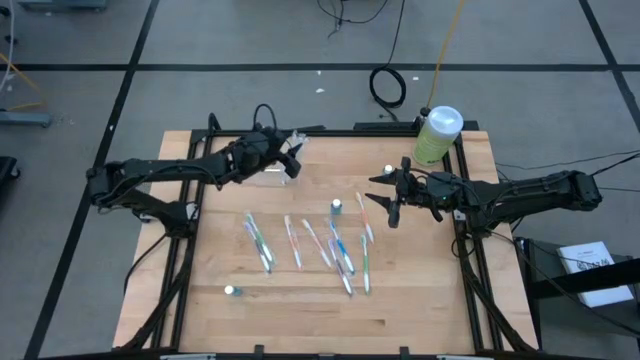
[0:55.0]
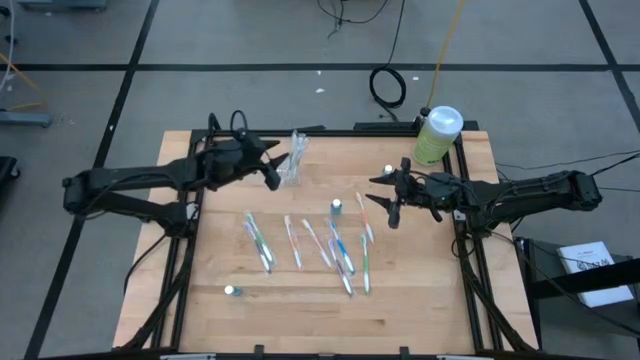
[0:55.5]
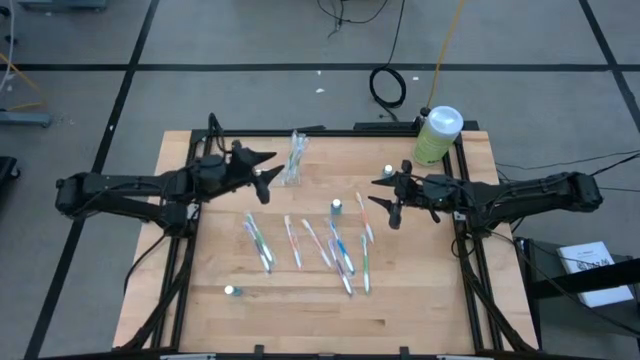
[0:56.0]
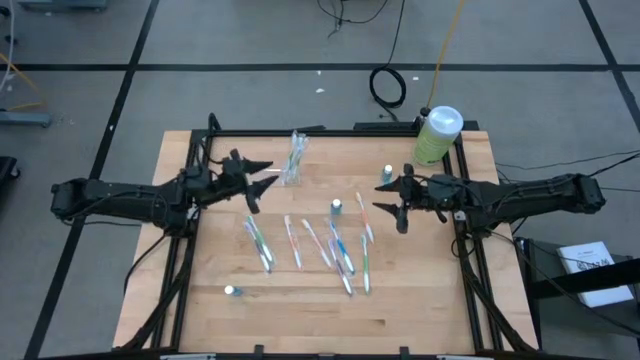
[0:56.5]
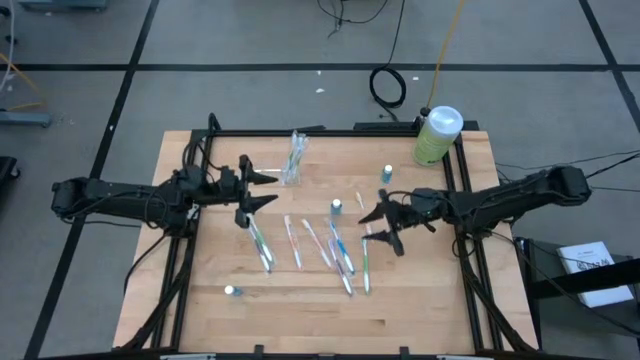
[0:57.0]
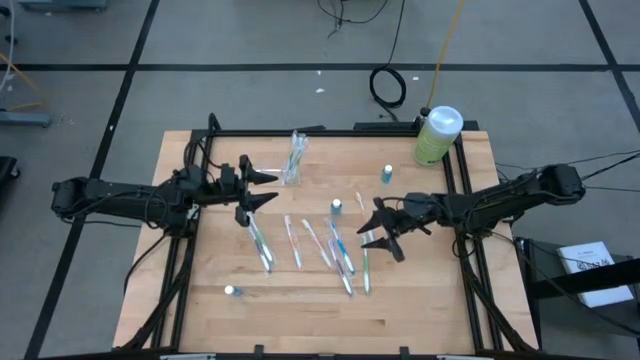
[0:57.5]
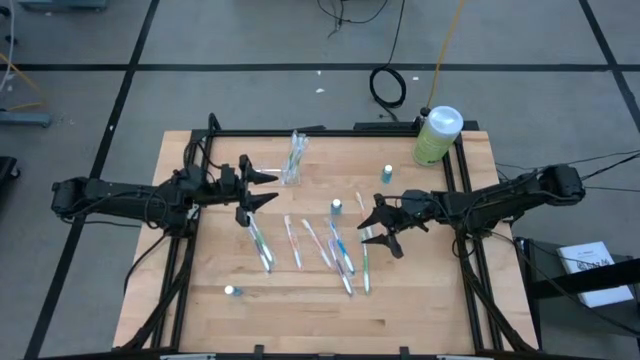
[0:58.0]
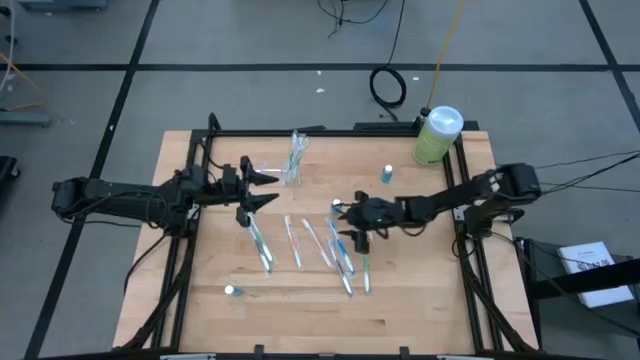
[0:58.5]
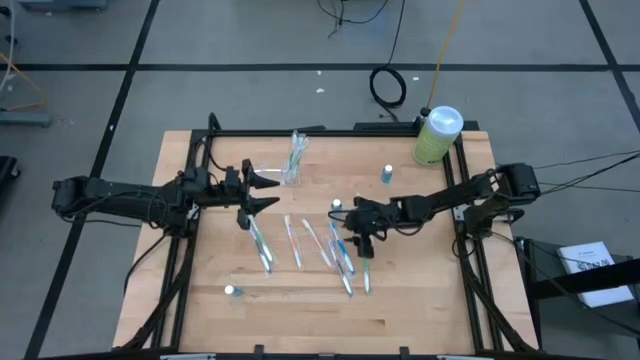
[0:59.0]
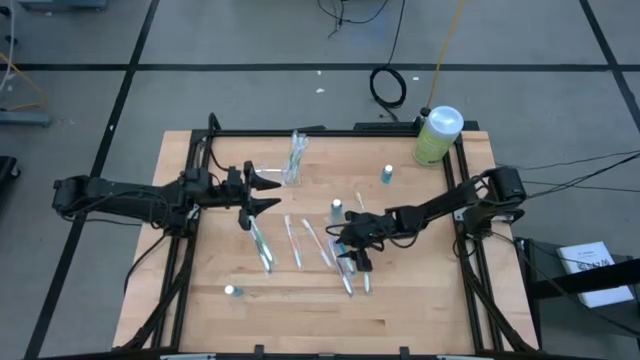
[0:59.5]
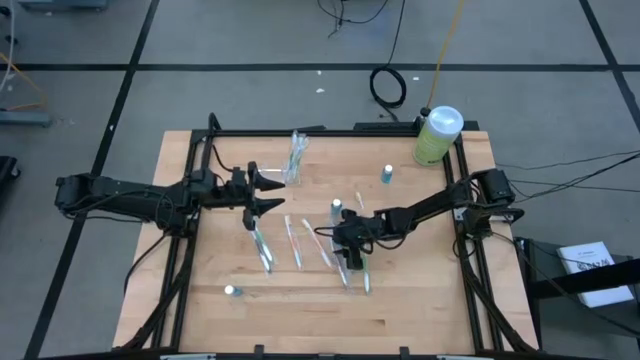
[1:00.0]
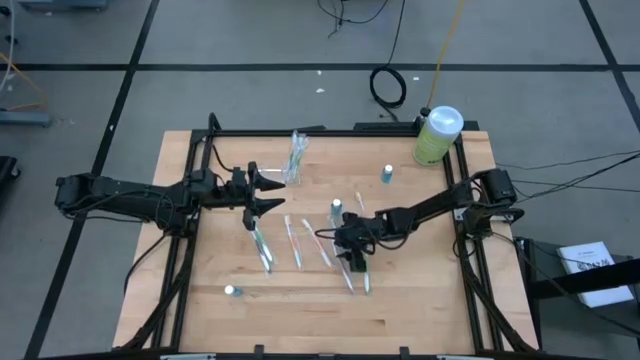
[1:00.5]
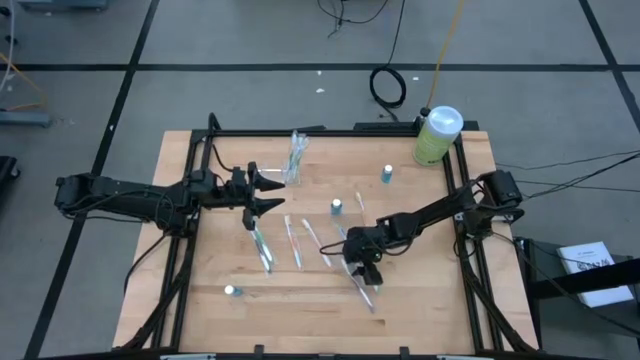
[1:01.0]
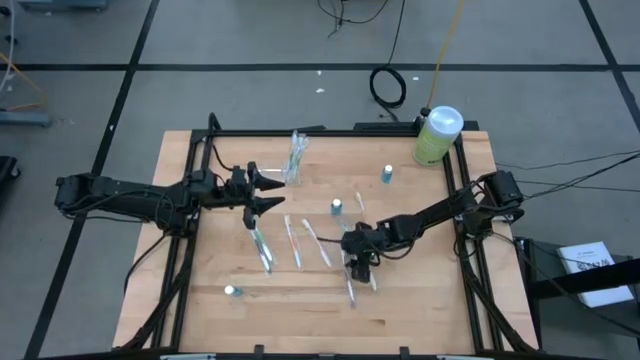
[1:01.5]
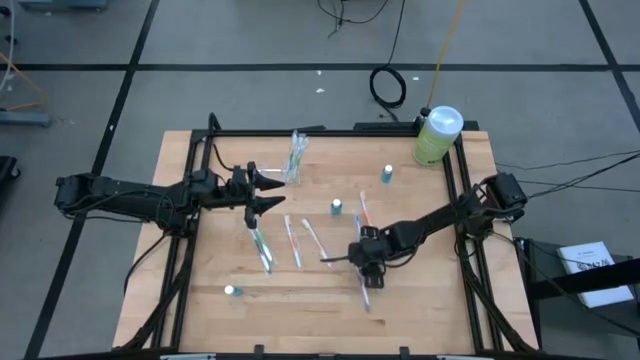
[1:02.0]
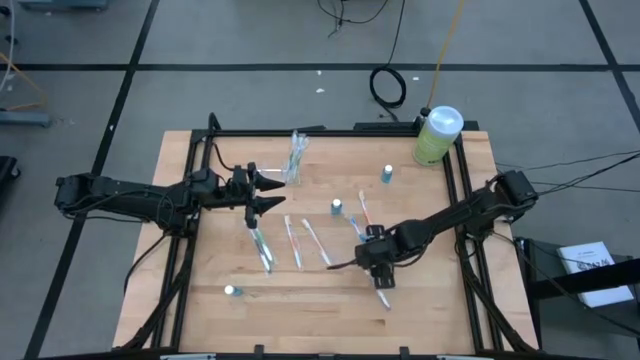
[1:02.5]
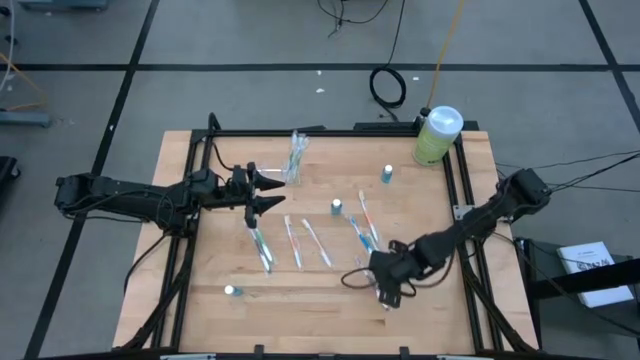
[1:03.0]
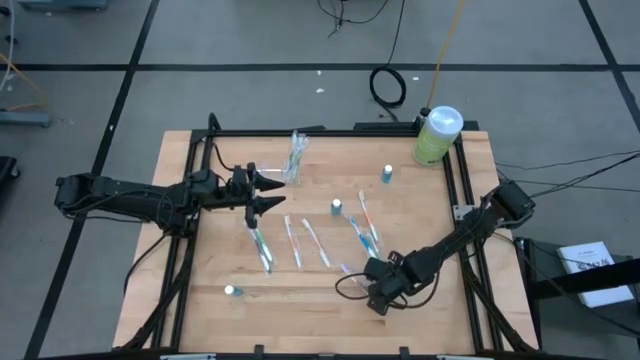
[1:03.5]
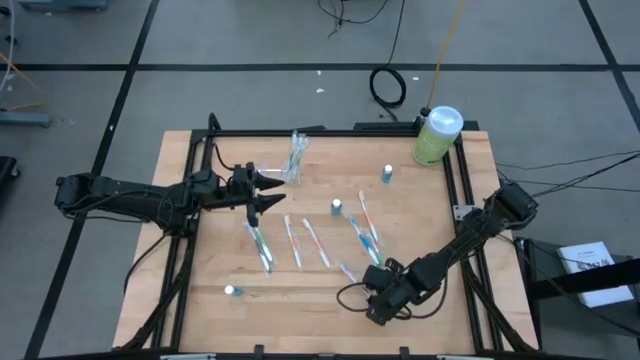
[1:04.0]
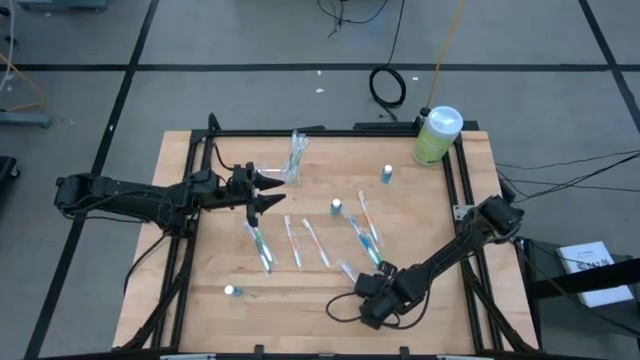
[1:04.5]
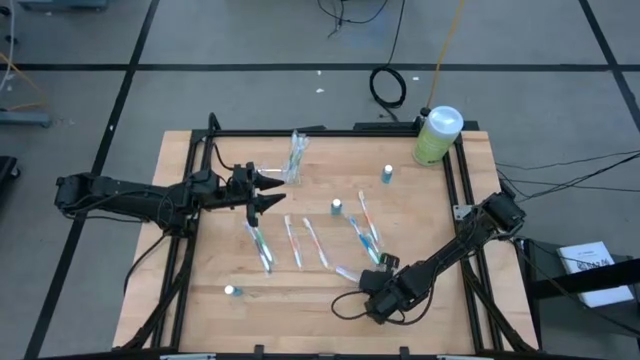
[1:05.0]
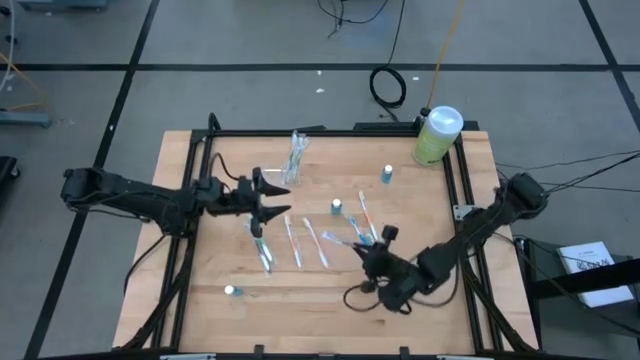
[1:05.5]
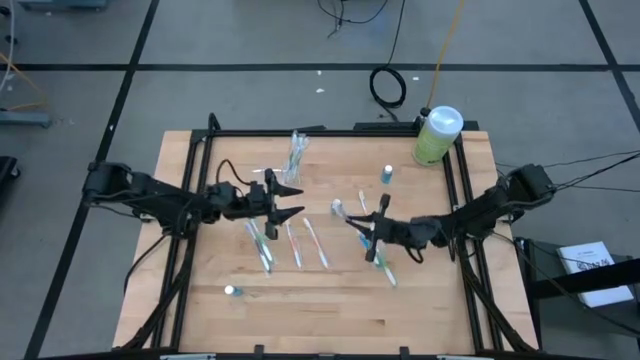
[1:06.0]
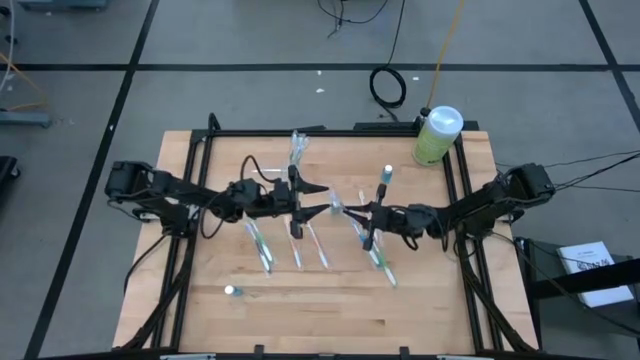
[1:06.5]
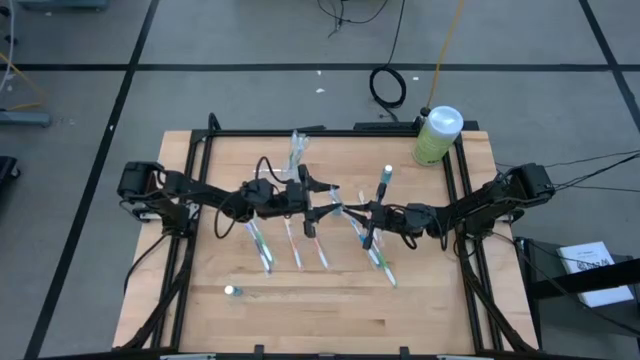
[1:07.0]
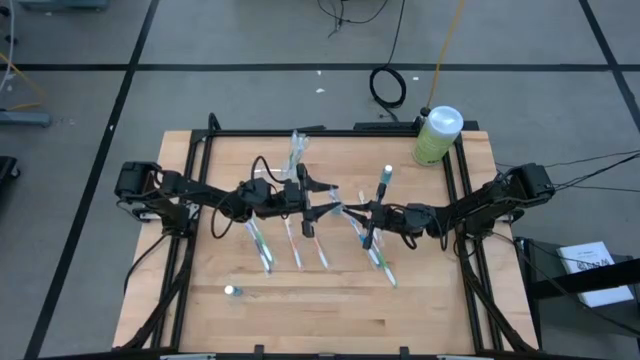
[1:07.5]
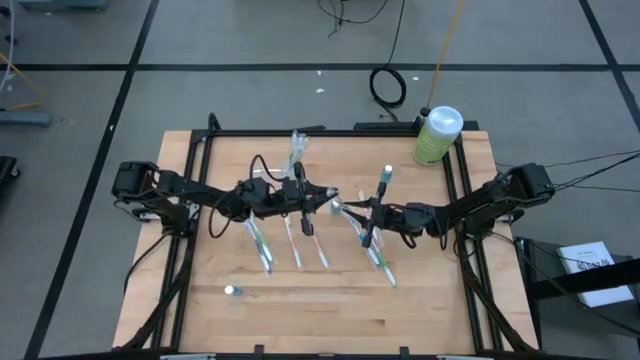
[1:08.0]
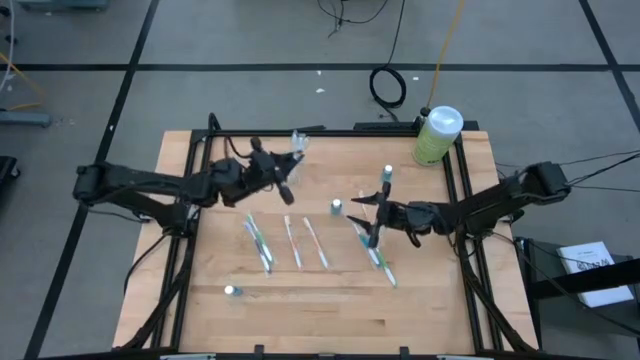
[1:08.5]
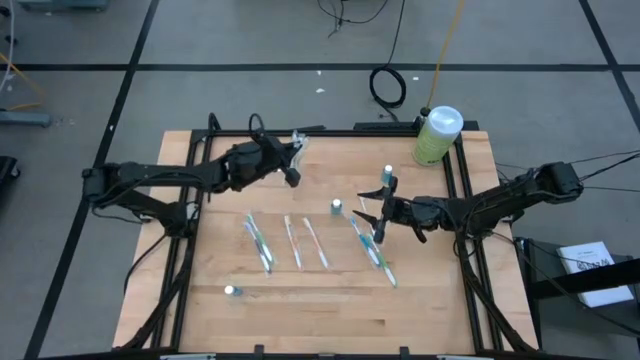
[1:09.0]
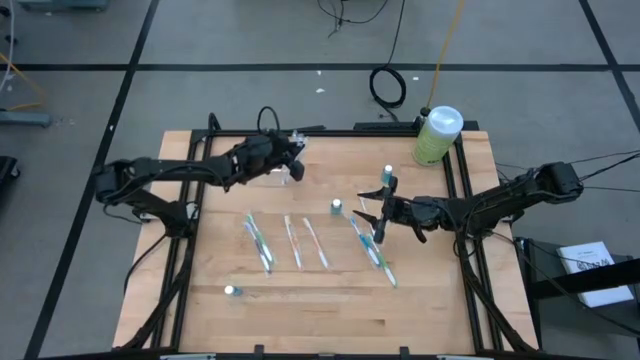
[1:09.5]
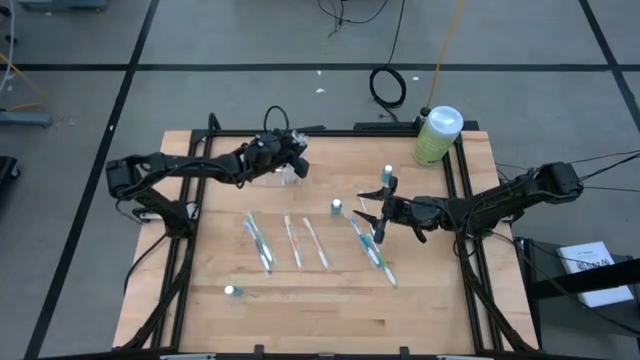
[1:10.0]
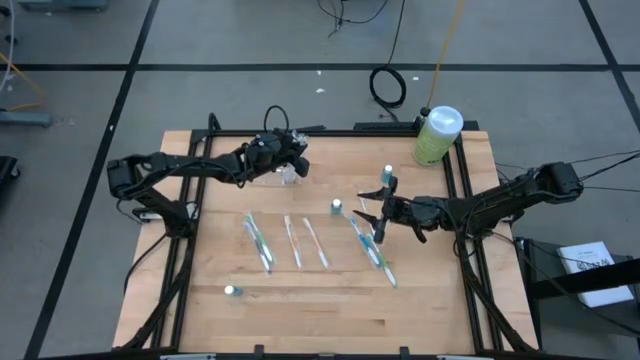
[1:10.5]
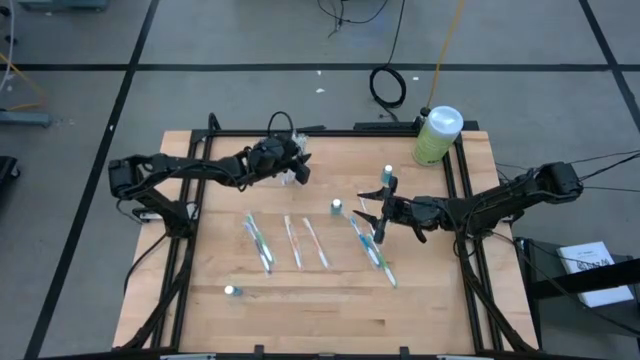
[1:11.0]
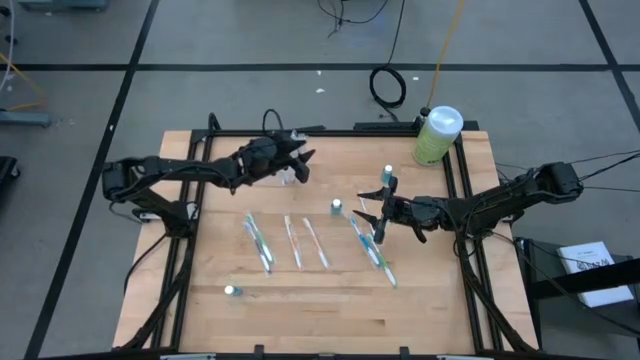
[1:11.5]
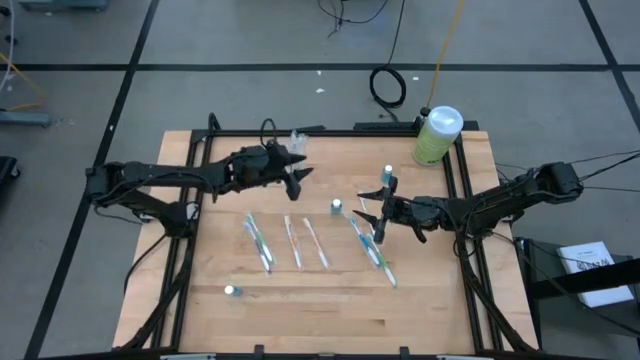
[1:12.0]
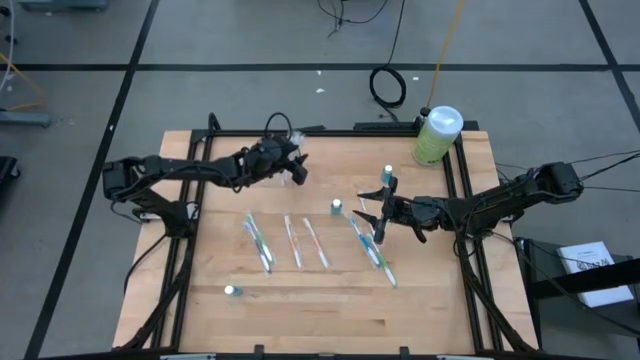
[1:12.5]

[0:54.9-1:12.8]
Task: Pick & Place toothbrushing station
Put the purple toothbrush into the transparent organizer

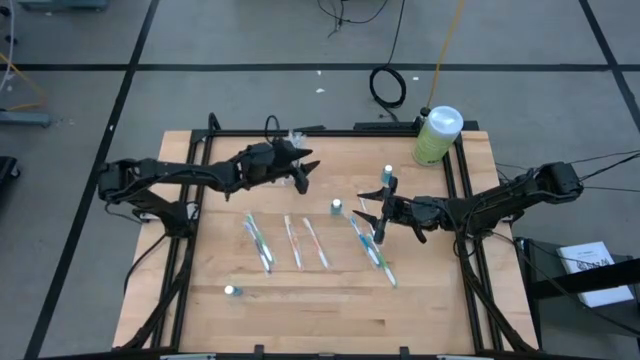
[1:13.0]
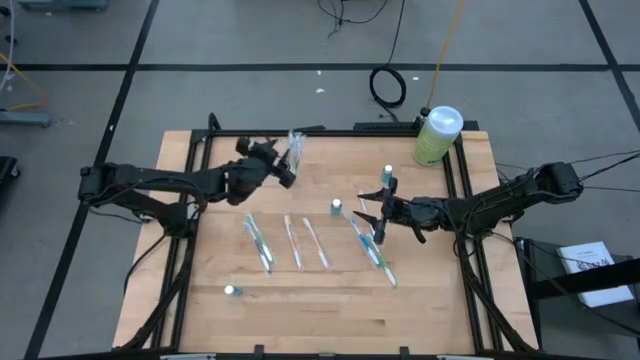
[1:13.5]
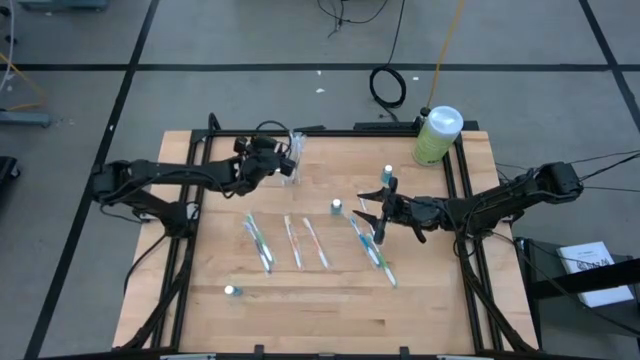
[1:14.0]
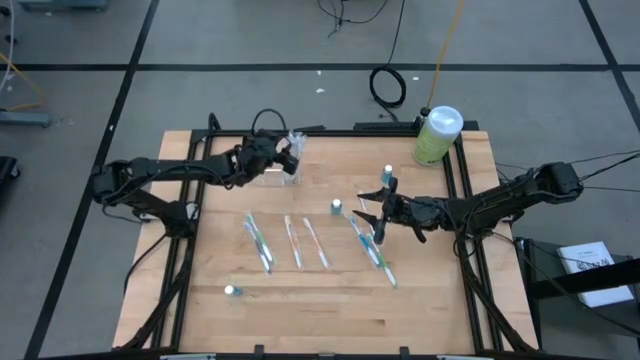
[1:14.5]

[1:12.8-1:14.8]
Adjust the blue toothbrush in the transparent organizer

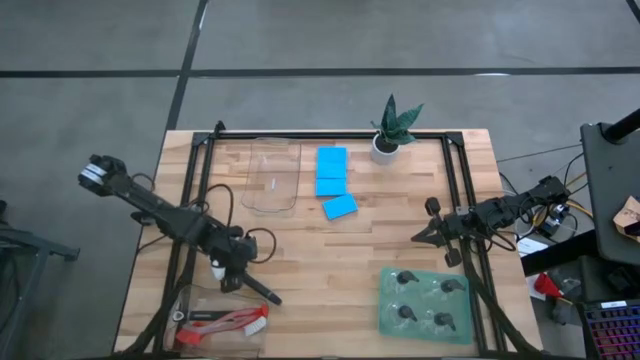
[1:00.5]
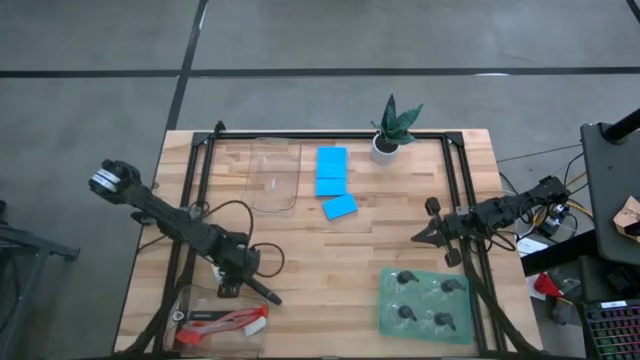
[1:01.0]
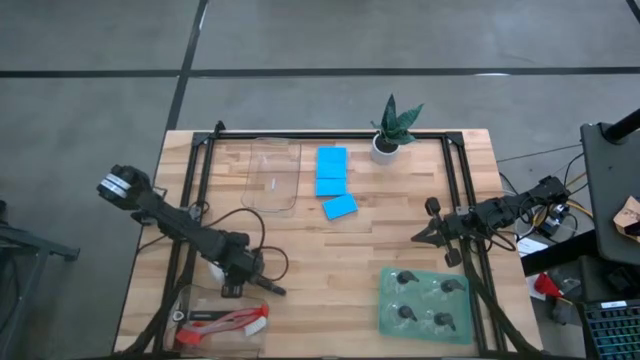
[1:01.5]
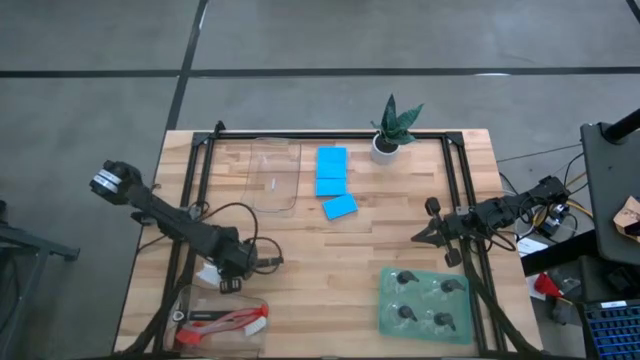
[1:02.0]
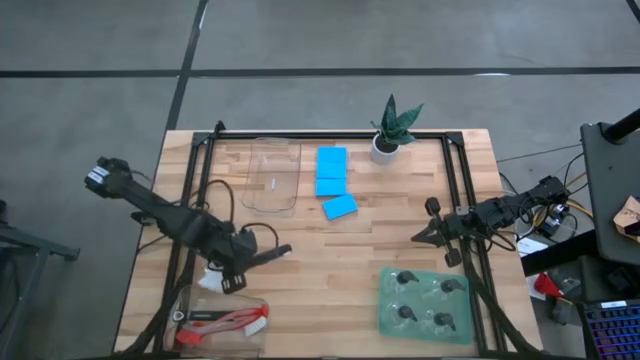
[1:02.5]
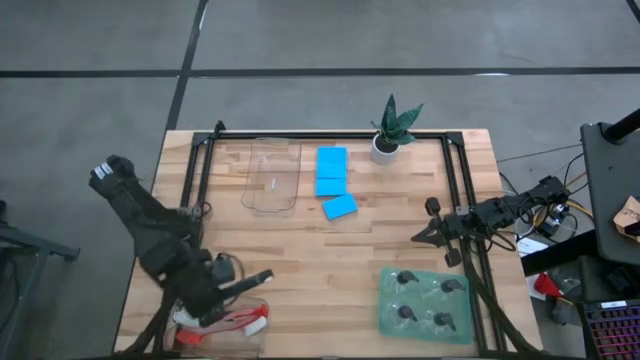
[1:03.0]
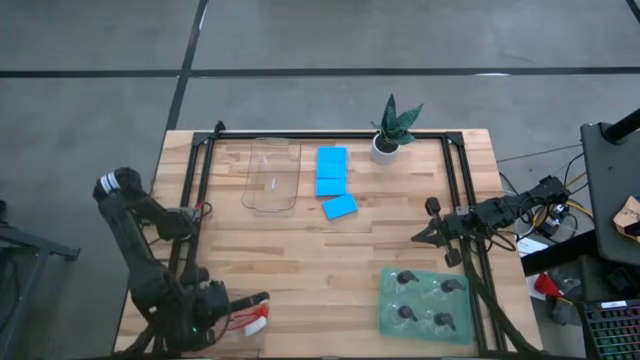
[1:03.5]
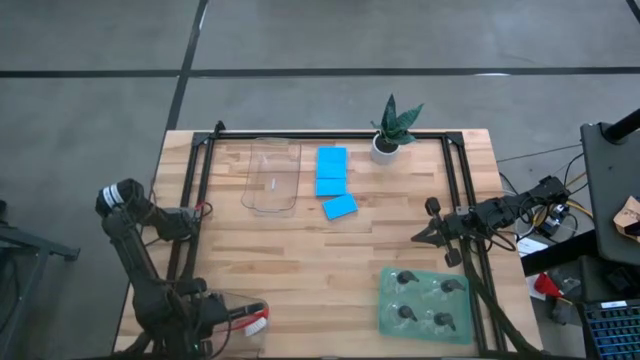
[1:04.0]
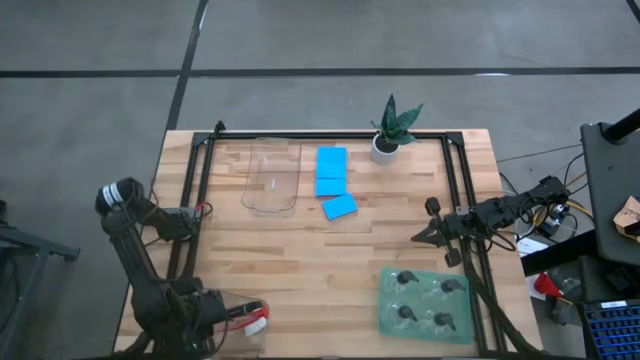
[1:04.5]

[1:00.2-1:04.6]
Task: Pick & Place Kitchen Sink Supplies
Put the black dish brush into the bottom transparent bin
